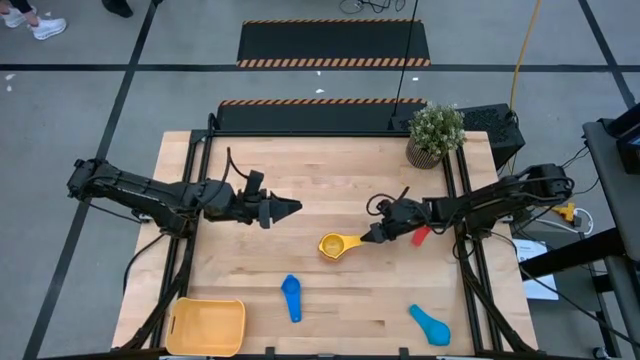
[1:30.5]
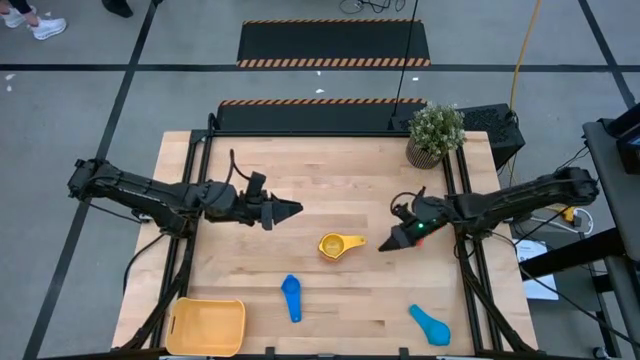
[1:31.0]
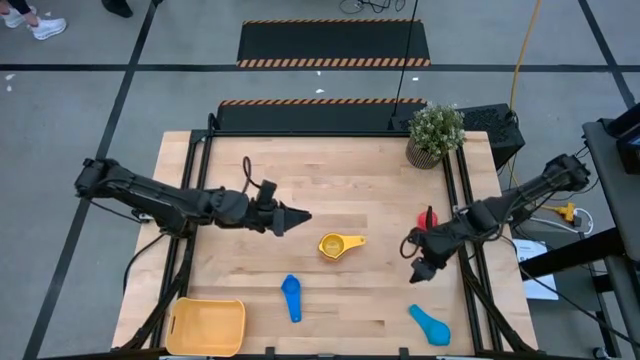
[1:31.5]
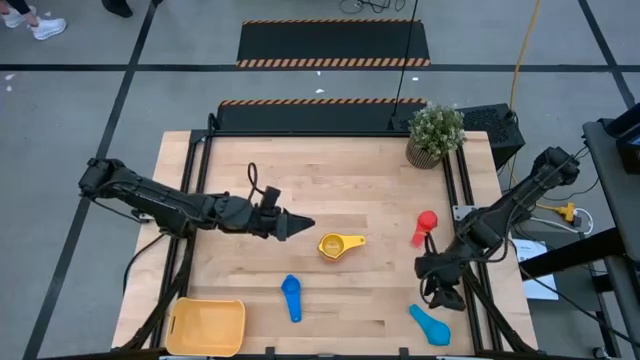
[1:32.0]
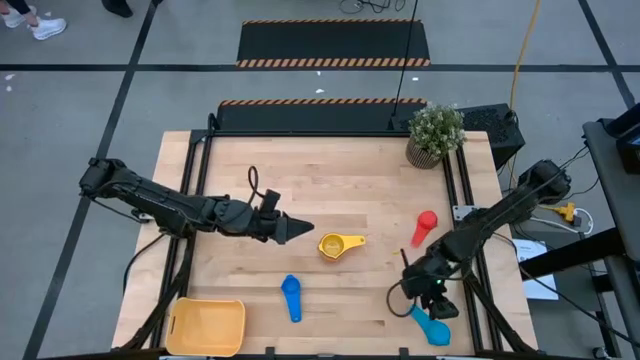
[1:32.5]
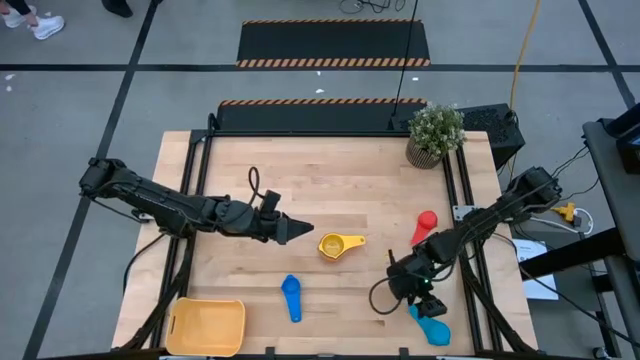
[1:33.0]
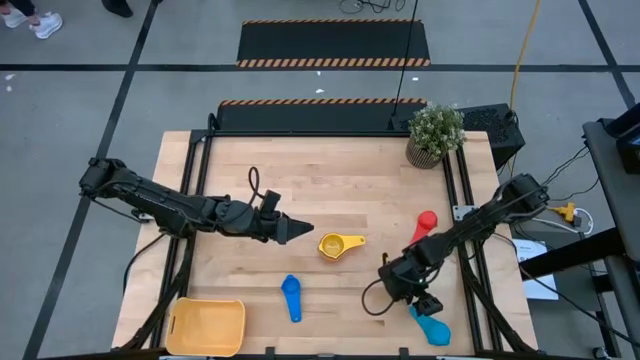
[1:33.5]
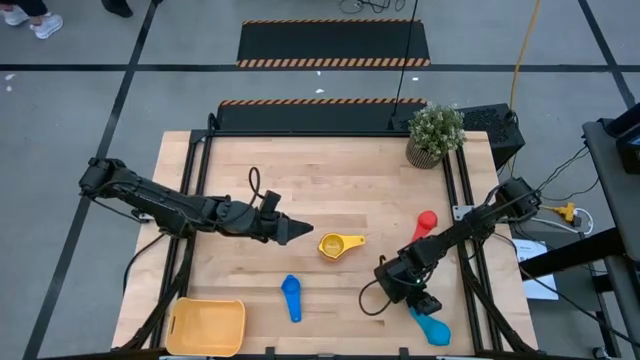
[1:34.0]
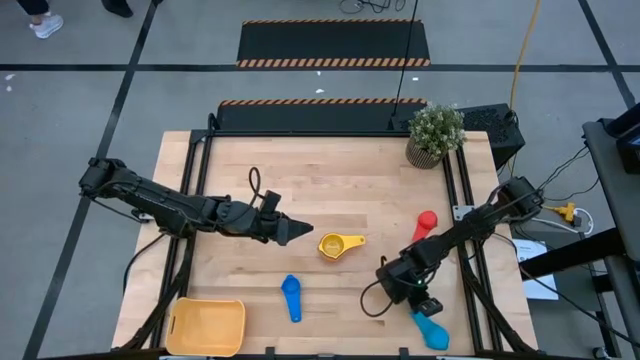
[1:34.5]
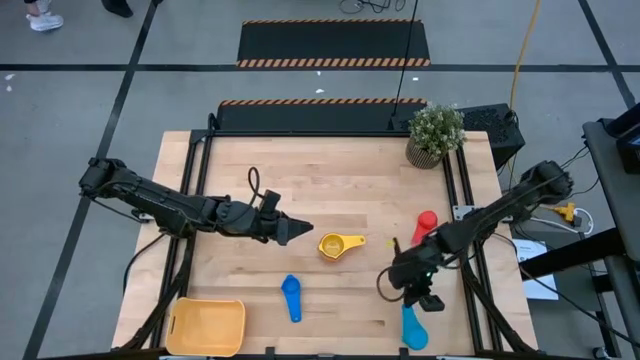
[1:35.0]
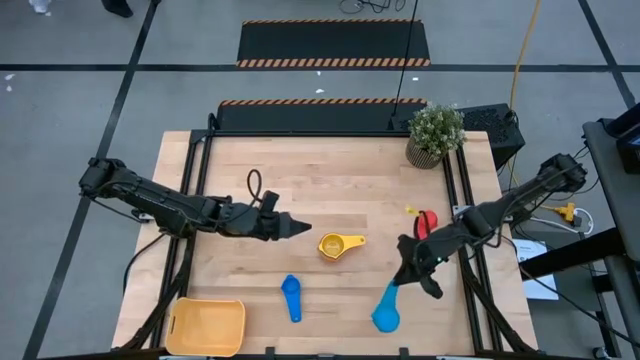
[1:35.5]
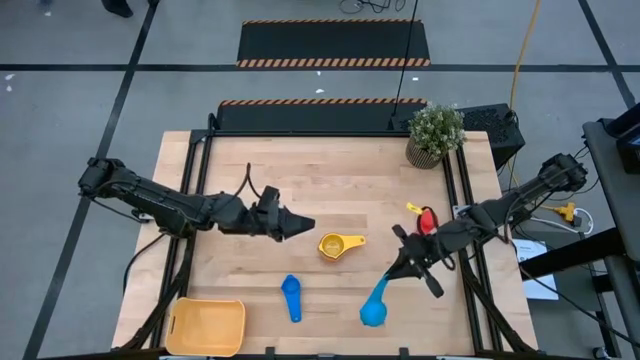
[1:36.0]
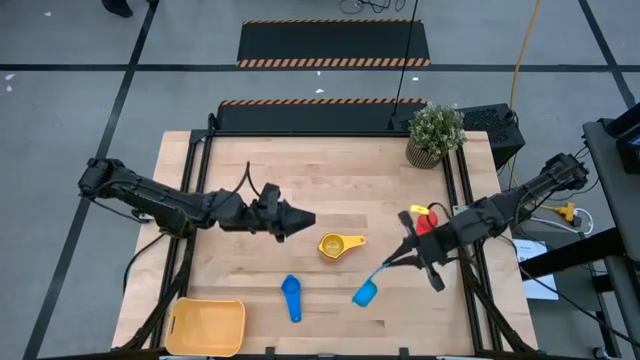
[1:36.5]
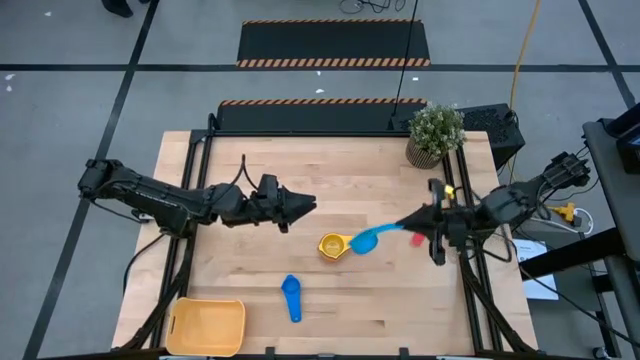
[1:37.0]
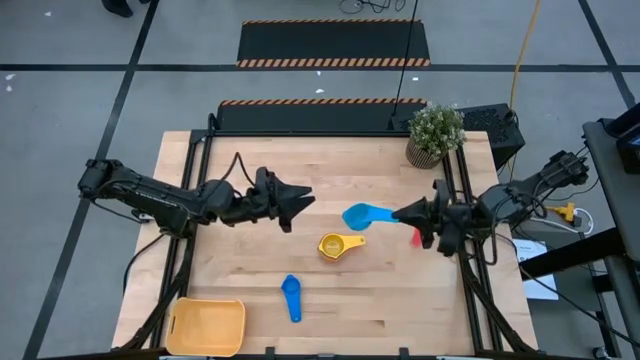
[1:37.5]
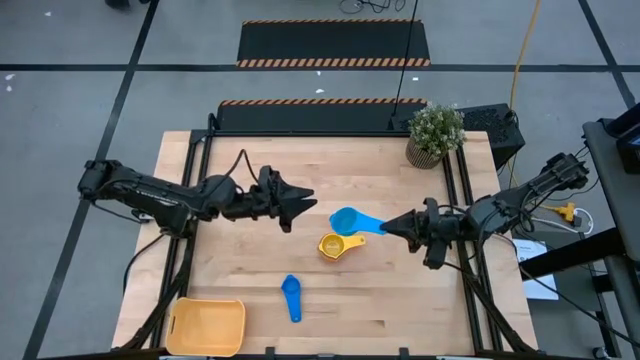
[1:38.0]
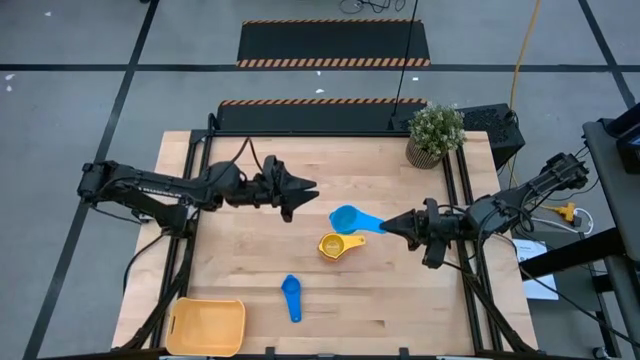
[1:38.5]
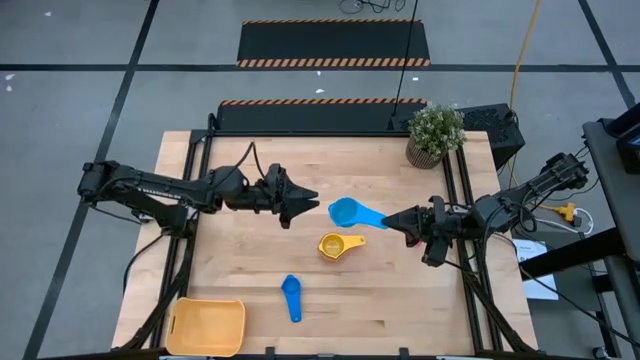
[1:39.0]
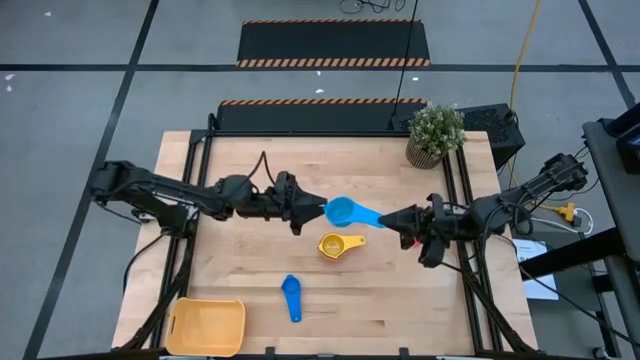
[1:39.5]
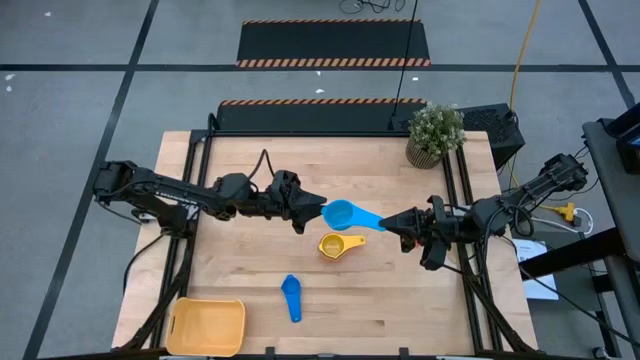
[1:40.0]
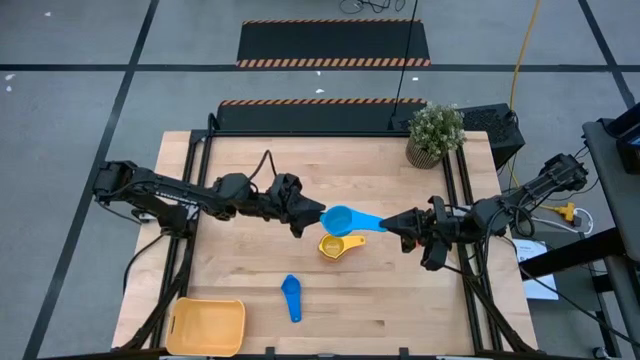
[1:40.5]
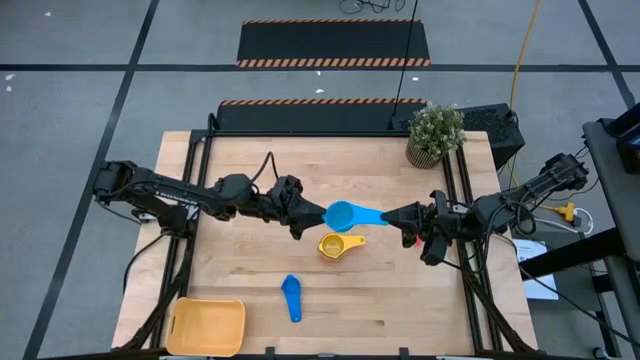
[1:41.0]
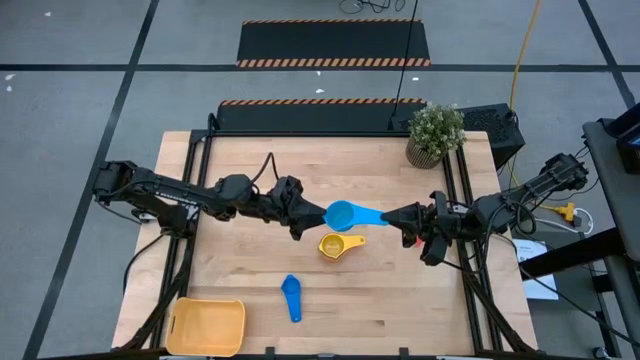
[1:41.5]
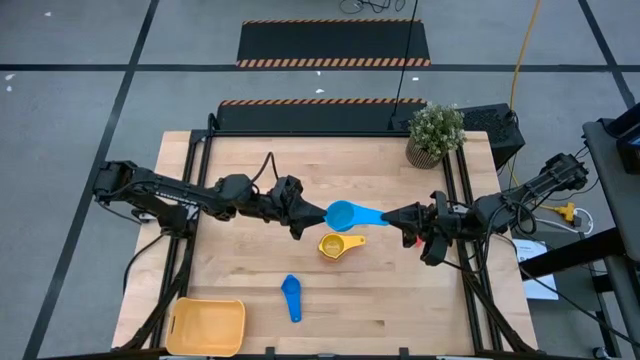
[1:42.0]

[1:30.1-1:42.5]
Task: Nest measuring cups in basket
Stack the light blue measuring cup on top of the yellow measuring cup

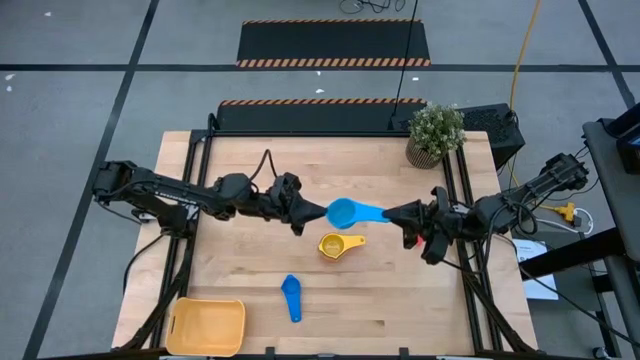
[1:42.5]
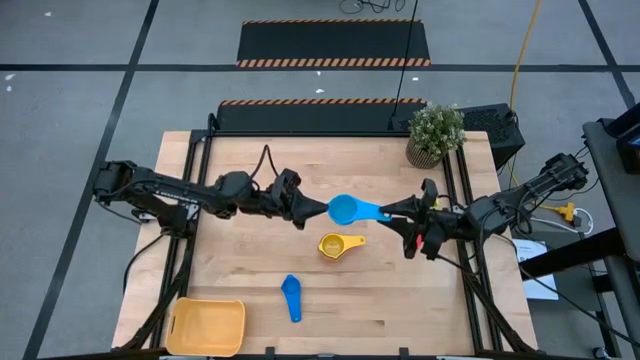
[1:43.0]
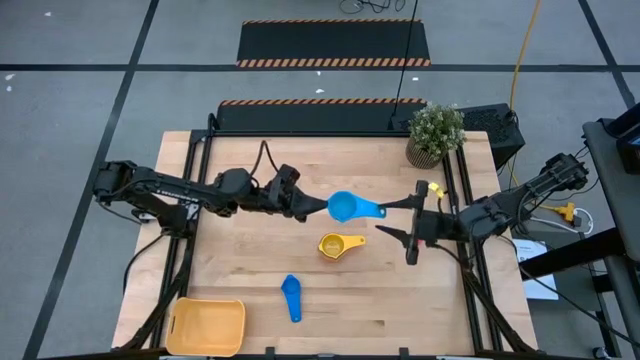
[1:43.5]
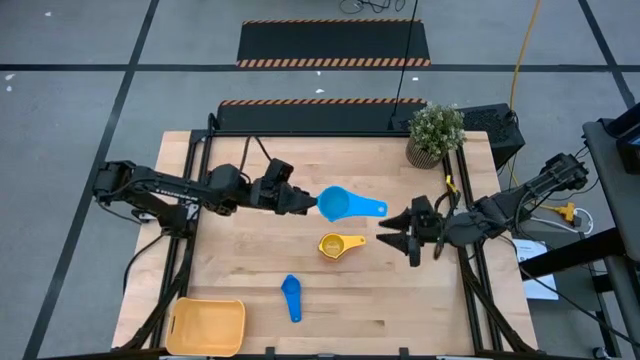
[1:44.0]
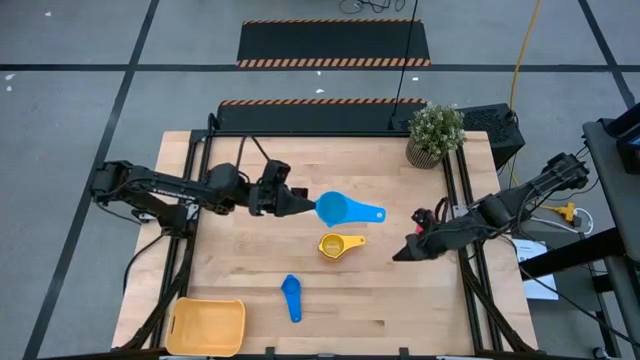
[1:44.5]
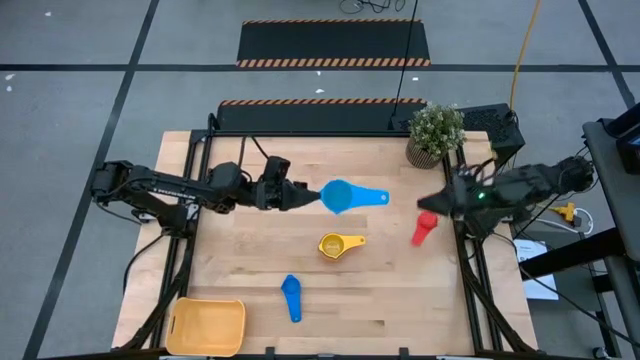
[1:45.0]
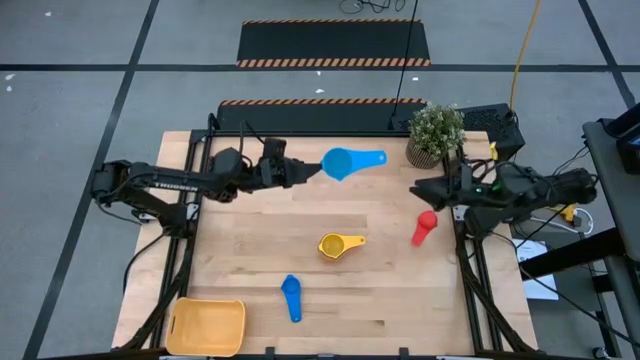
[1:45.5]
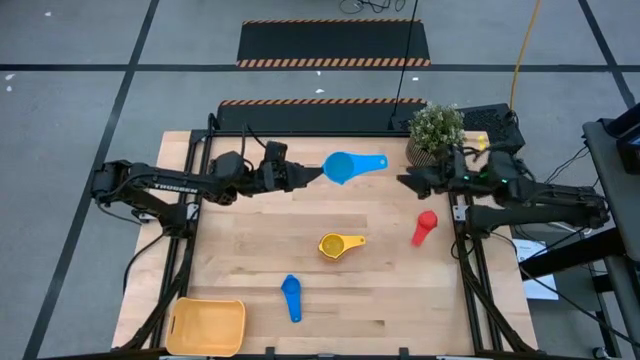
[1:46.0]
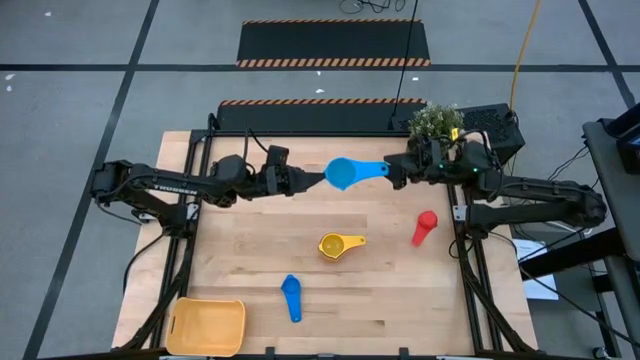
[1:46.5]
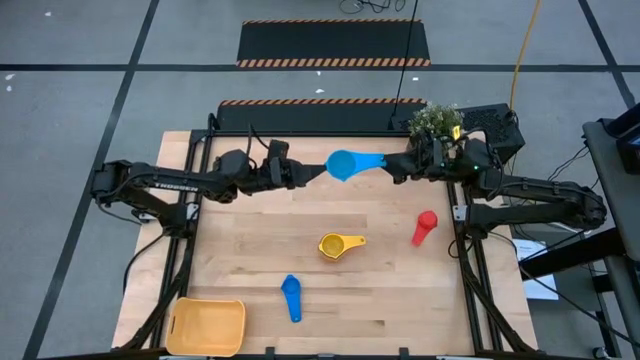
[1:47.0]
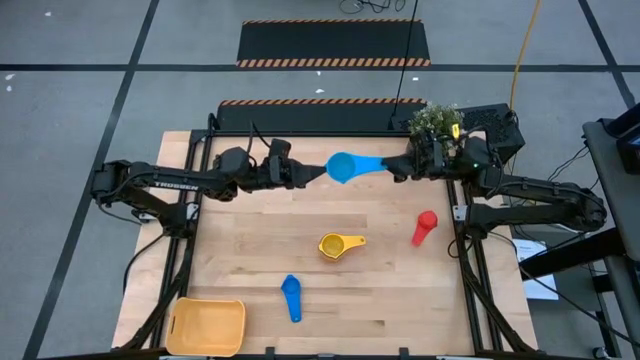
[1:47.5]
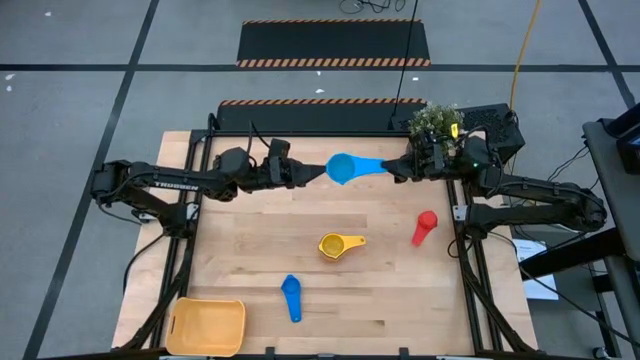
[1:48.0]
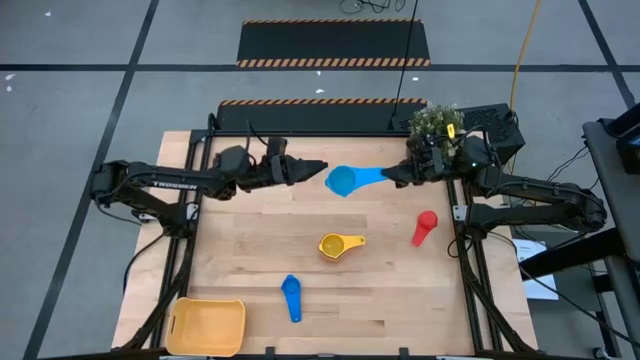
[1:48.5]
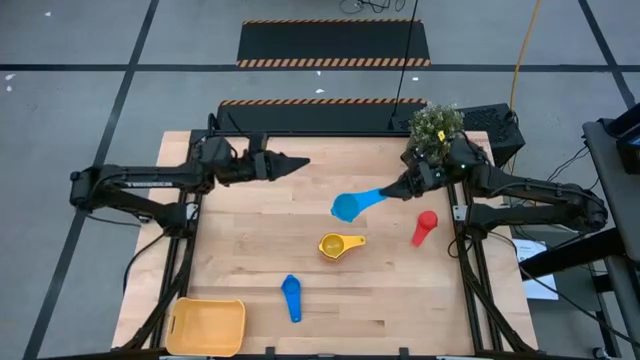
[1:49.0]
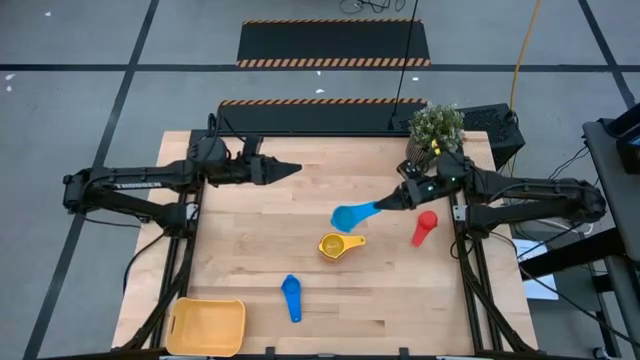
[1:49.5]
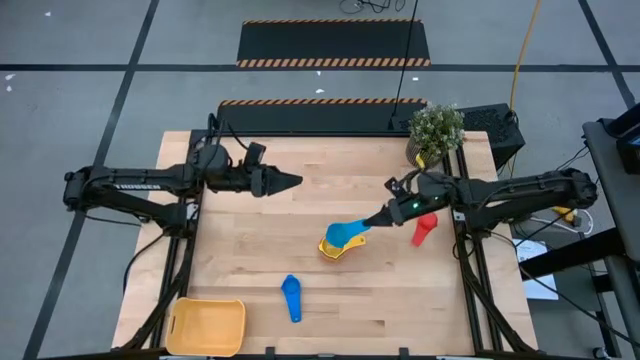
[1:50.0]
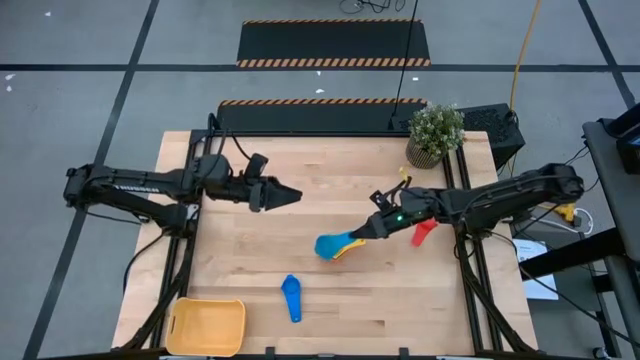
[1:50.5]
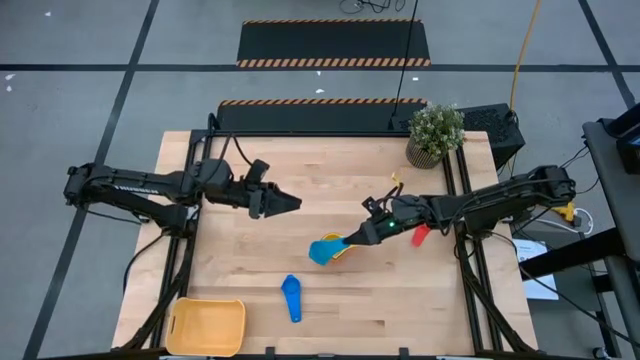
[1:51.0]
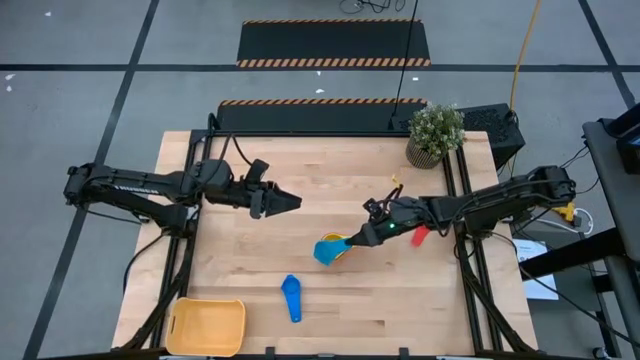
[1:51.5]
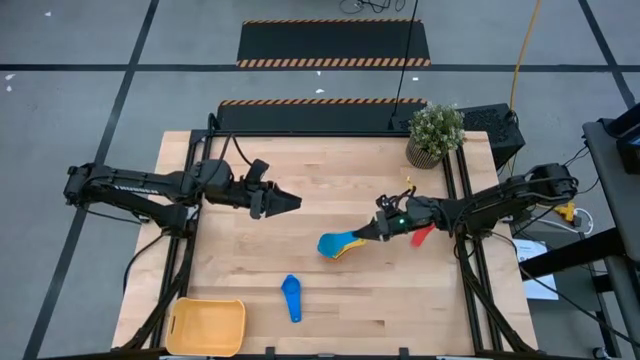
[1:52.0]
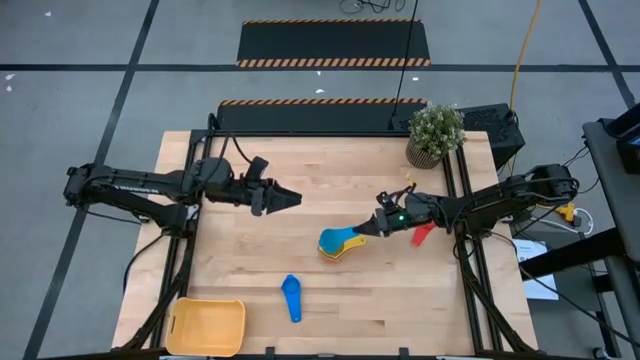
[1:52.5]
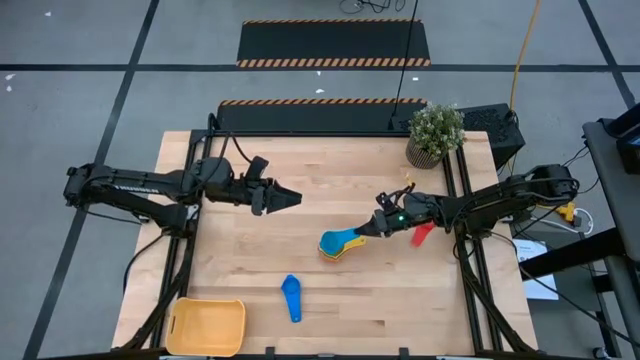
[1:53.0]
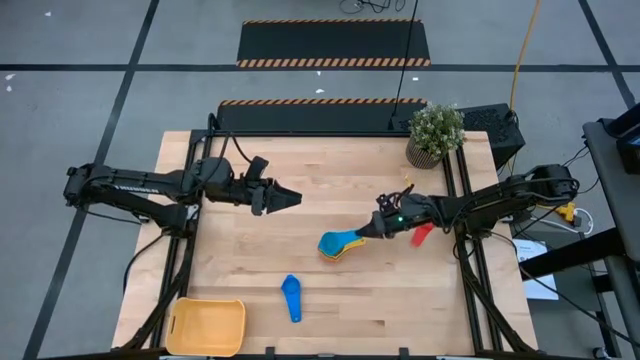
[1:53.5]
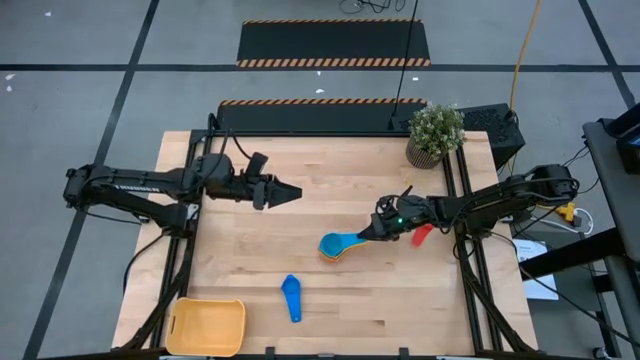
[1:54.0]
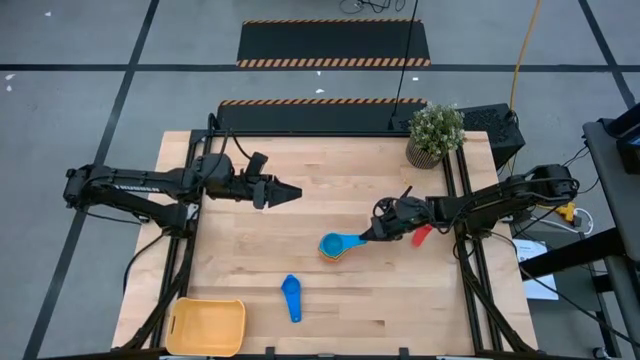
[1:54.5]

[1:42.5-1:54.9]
Stack the light blue measuring cup on top of the yellow measuring cup
